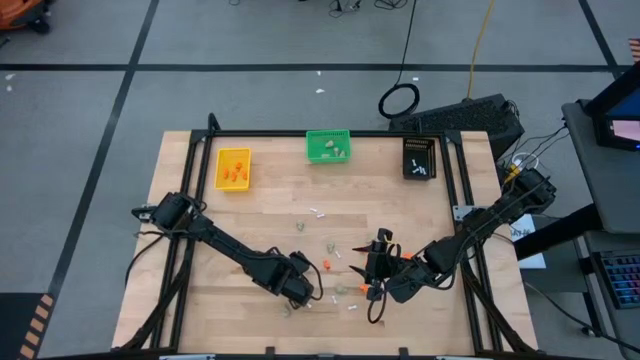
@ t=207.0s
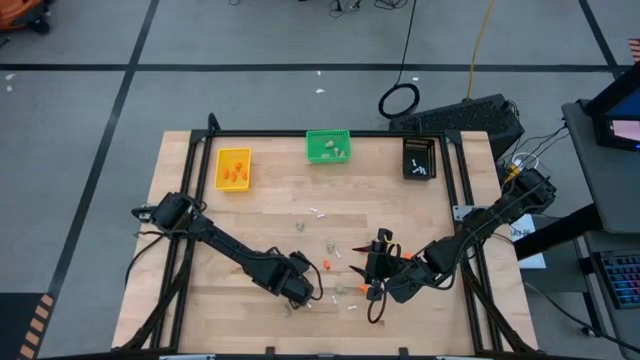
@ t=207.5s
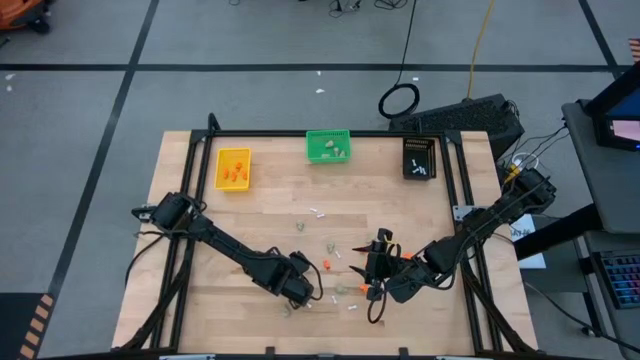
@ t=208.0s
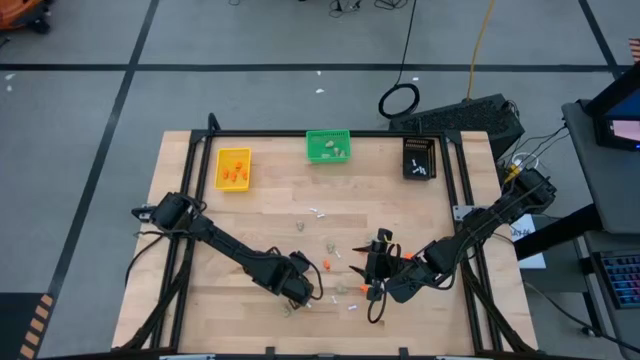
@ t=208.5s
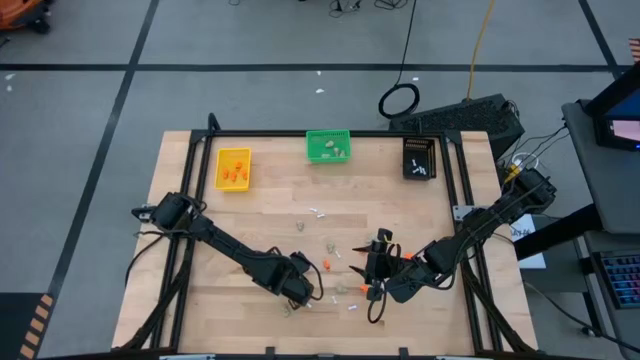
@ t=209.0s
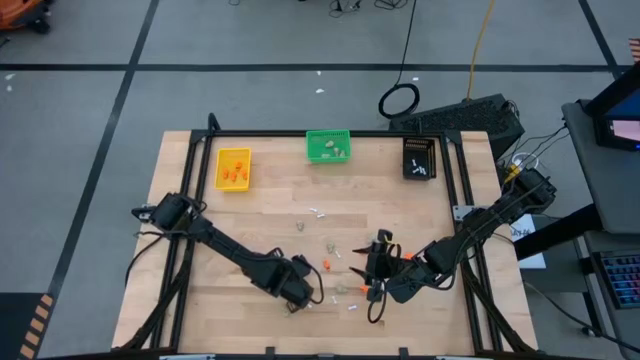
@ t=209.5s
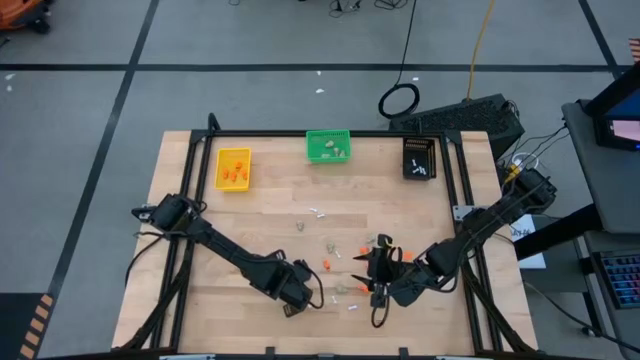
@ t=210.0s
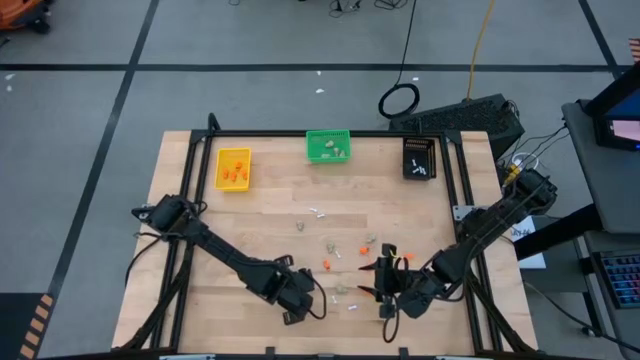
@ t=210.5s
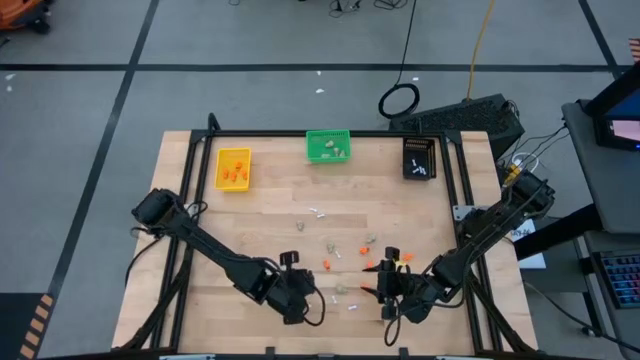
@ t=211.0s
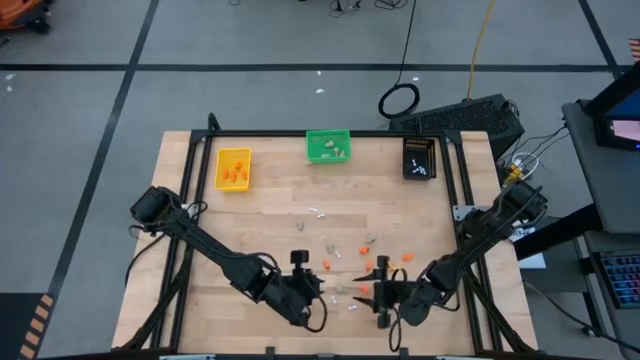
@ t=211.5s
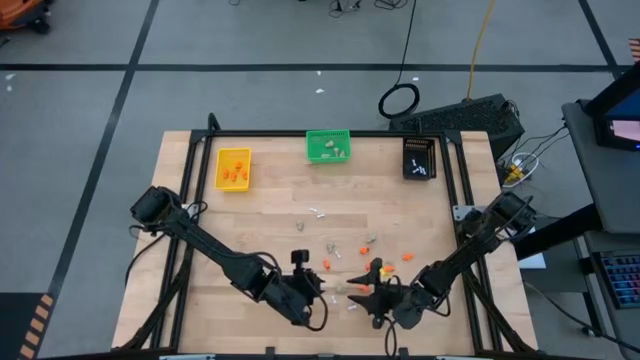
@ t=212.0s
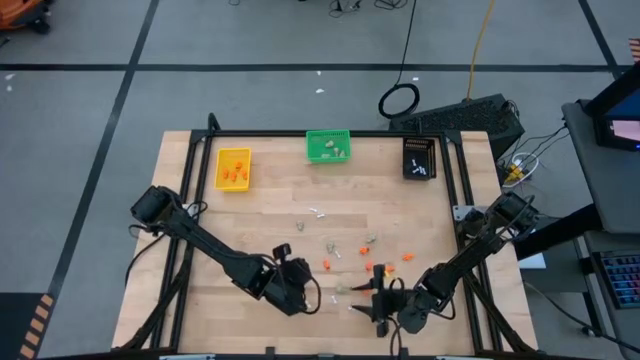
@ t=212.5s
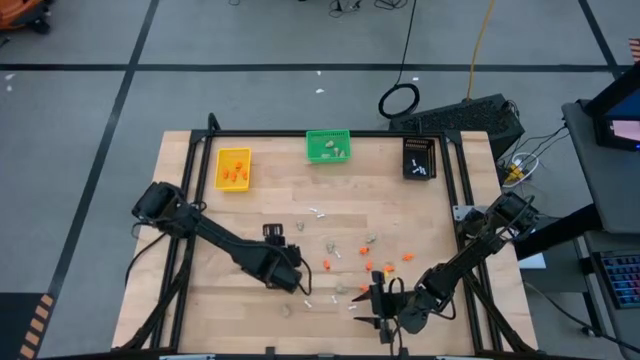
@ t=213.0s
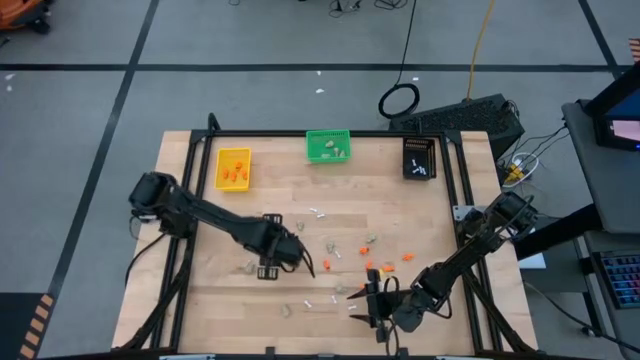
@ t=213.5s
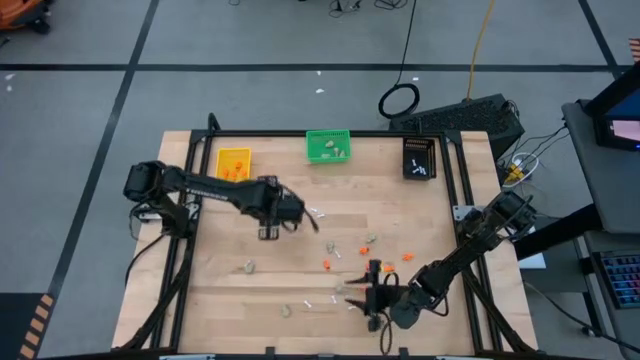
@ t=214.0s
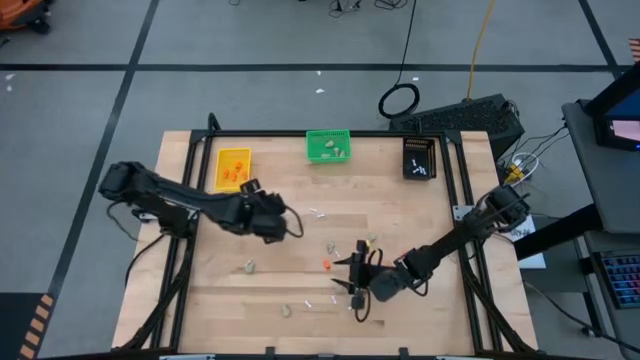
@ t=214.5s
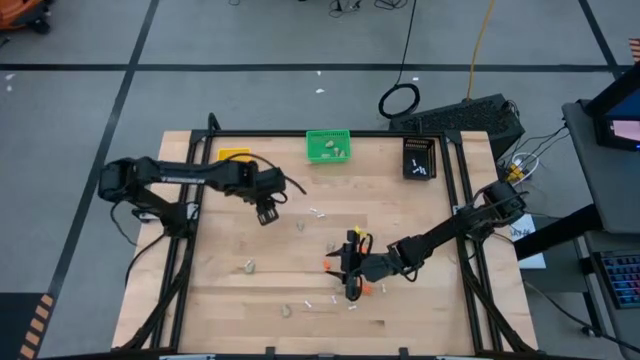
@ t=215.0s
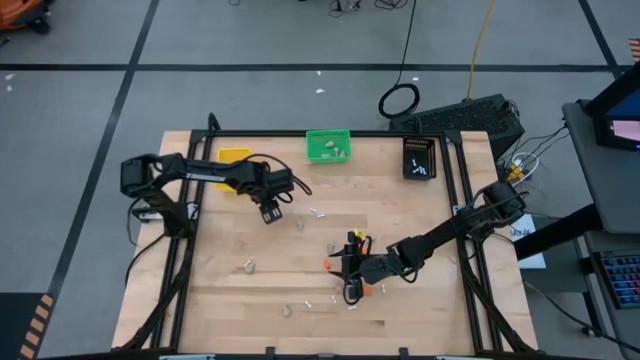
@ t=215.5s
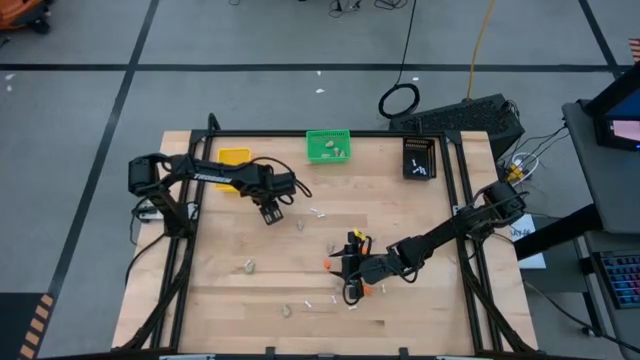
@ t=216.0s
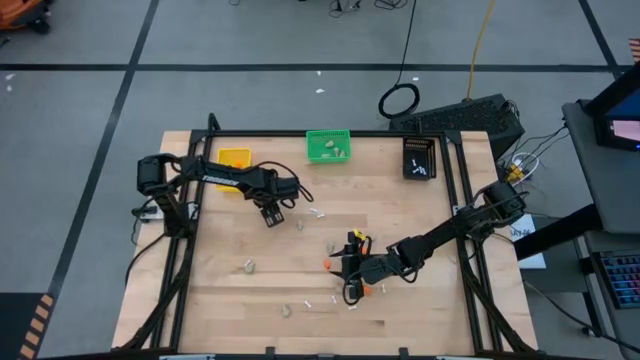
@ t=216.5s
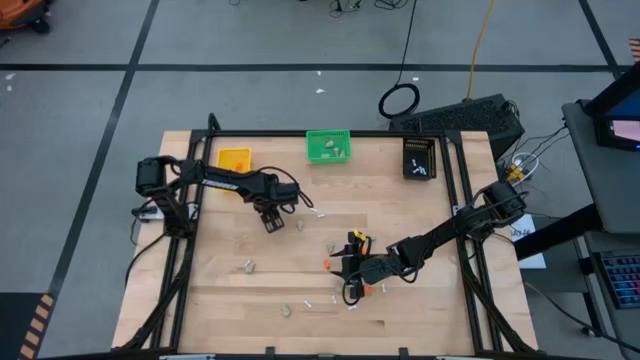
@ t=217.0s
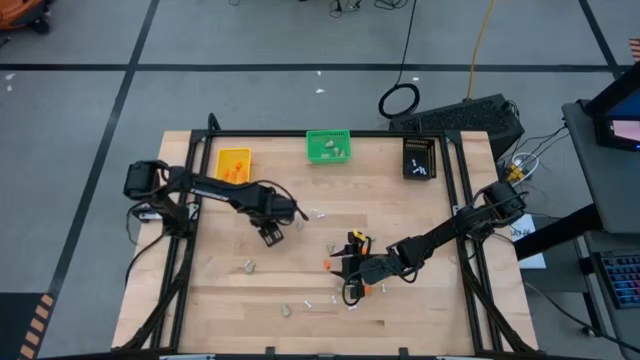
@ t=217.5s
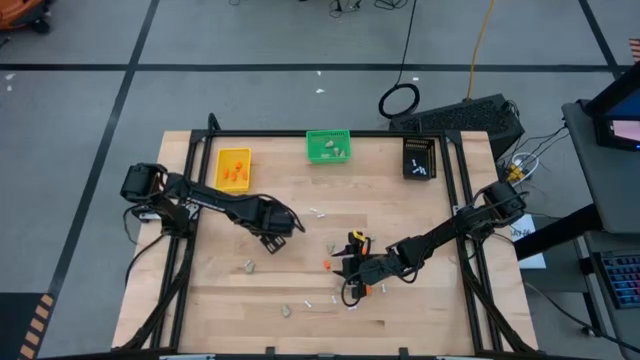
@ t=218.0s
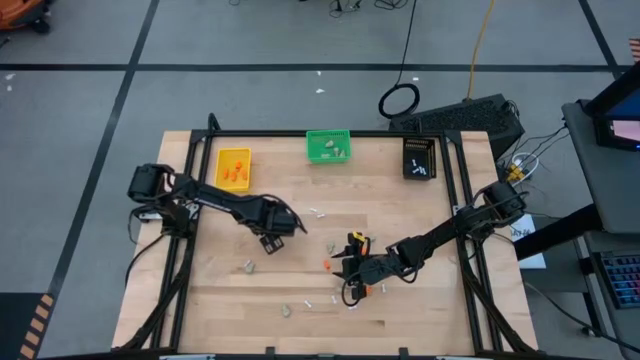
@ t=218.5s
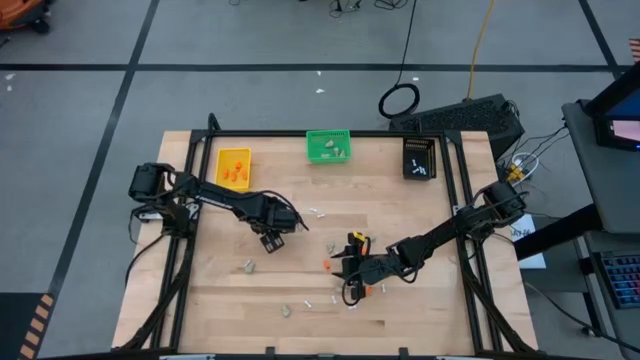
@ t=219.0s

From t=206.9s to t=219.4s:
Task: Sort Halloween decoration
Put the white bone toy into the black bin

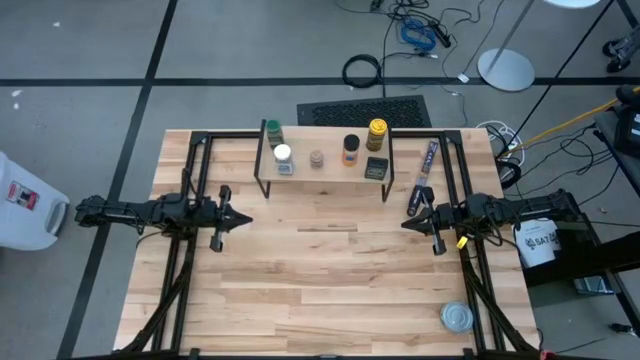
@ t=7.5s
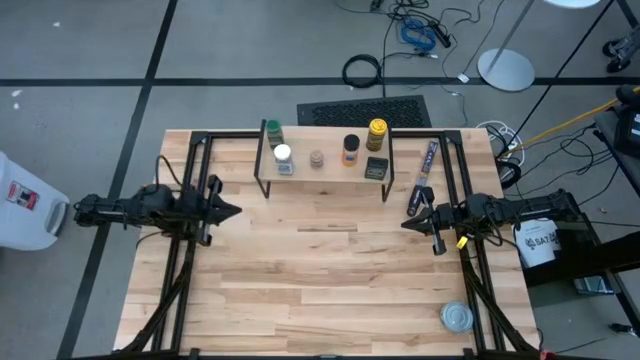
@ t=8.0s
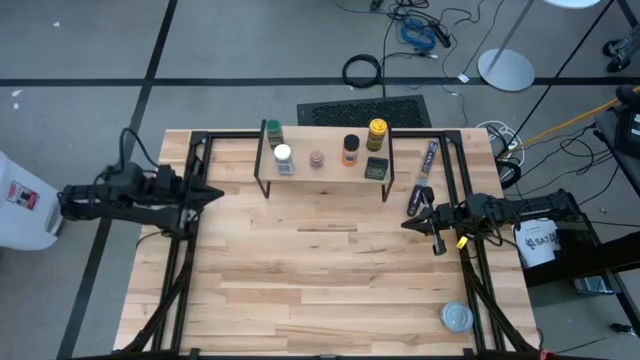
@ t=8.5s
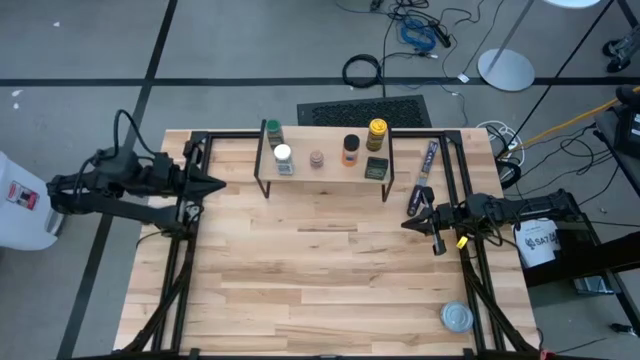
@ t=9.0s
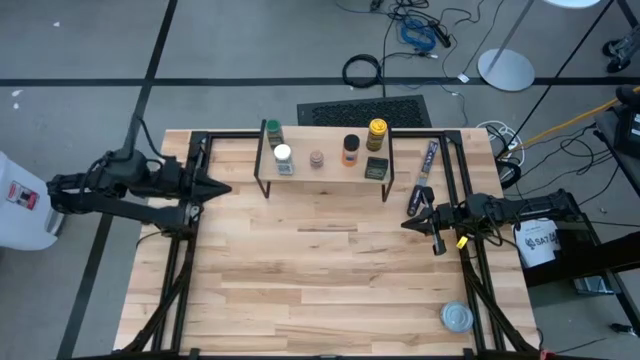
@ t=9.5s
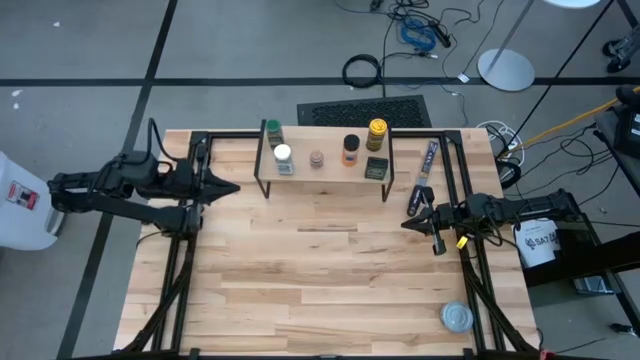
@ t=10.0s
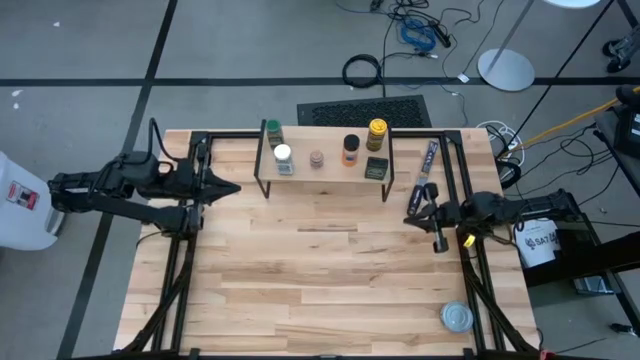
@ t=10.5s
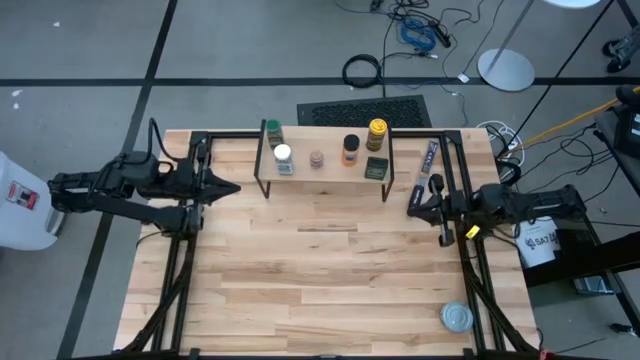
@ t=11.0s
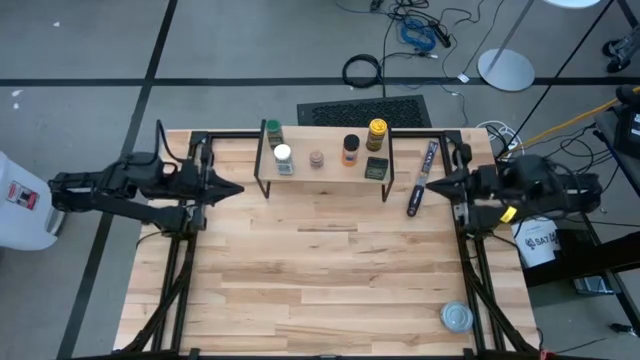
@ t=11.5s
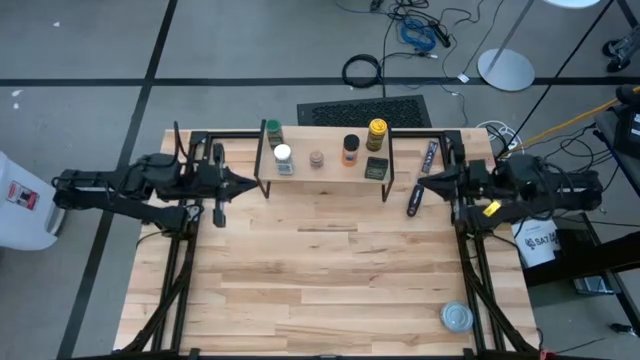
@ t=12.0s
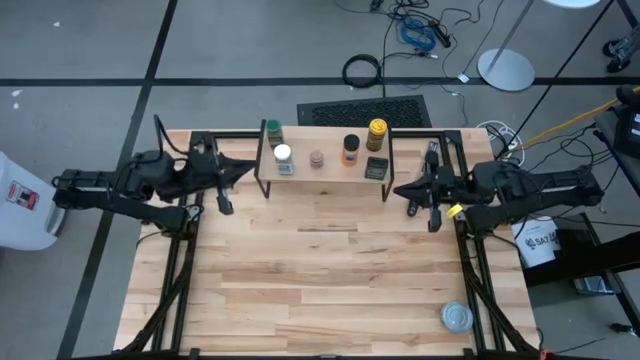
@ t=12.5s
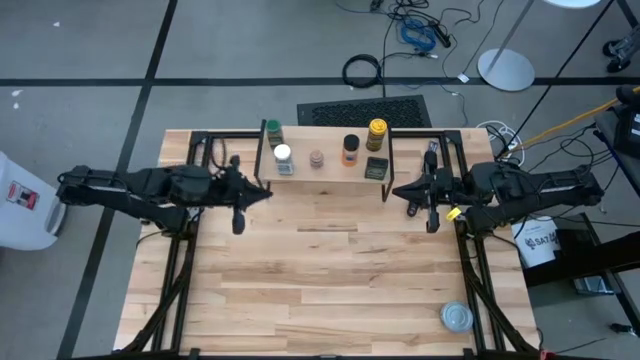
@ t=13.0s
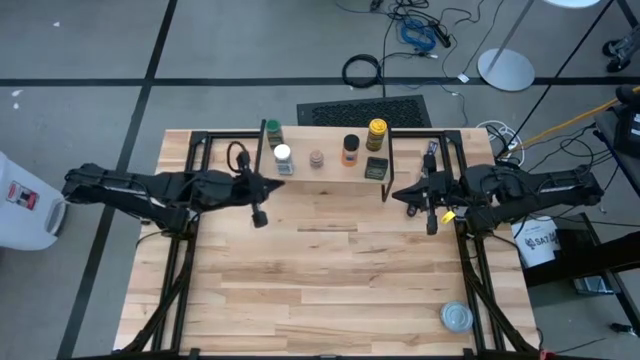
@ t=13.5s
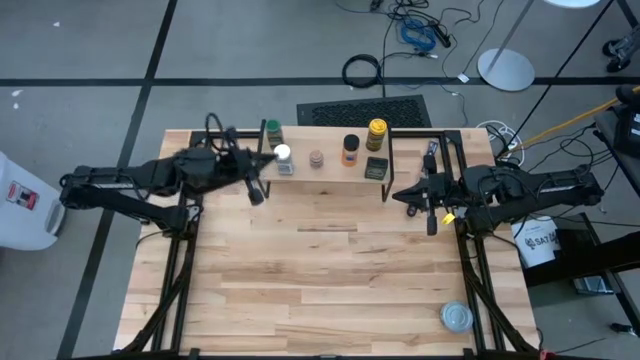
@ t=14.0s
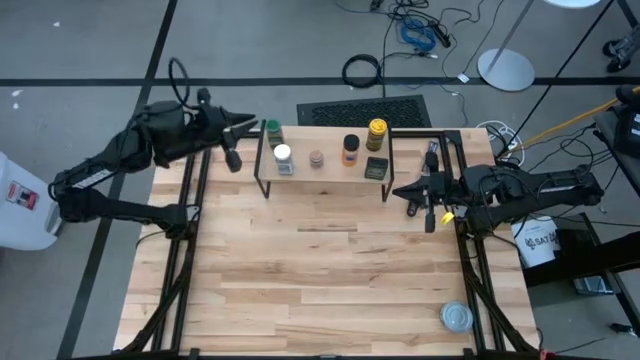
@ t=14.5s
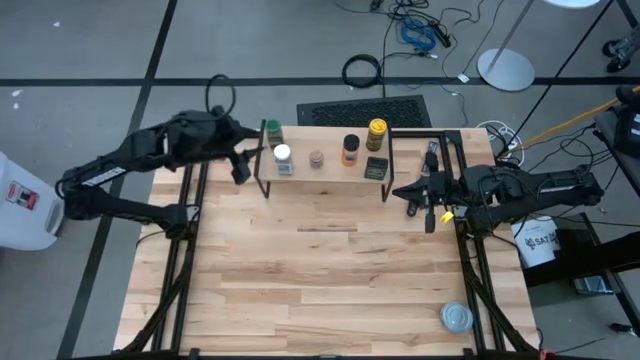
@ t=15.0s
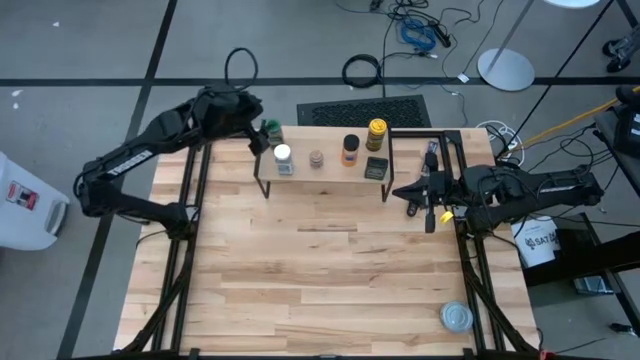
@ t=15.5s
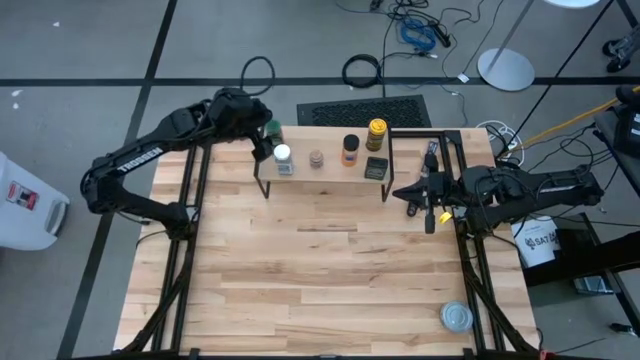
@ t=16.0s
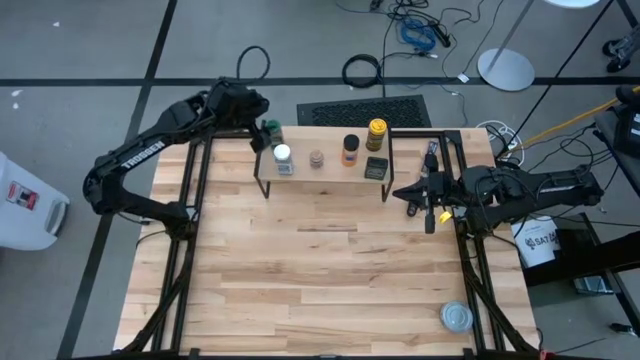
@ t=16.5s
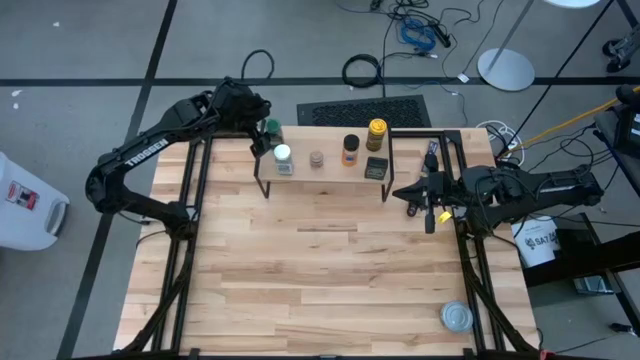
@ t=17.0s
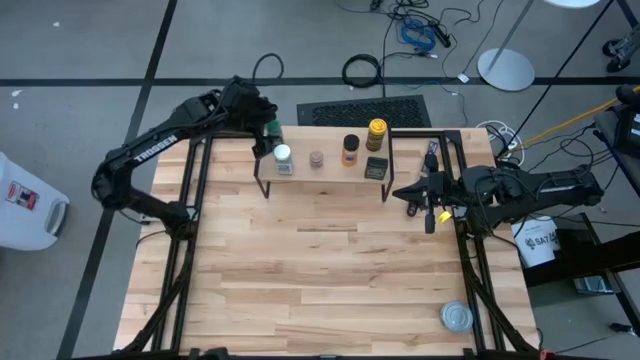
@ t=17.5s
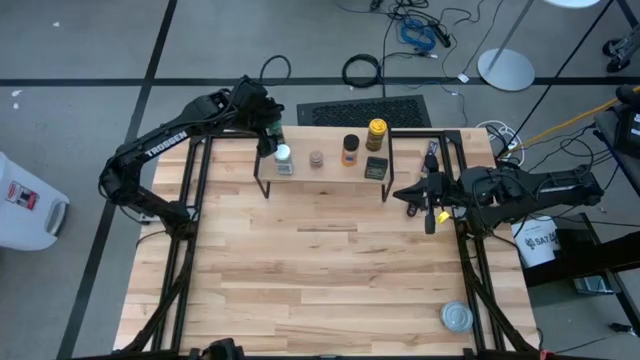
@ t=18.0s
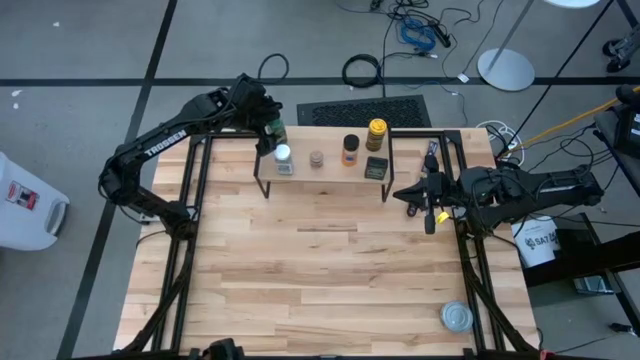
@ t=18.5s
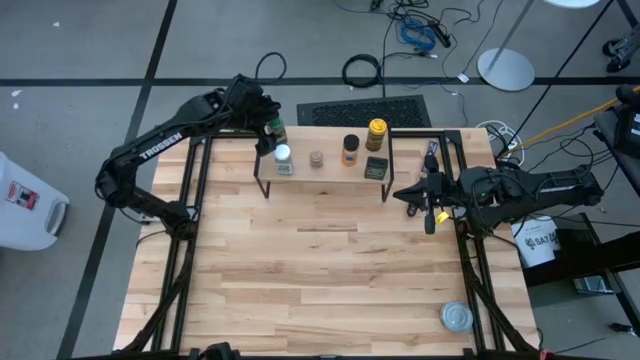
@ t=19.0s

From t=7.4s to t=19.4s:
Task: Shelf spices
Remove the green seasoning bottle from the shelf
